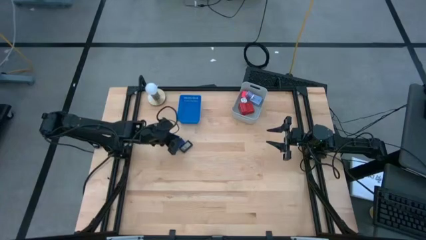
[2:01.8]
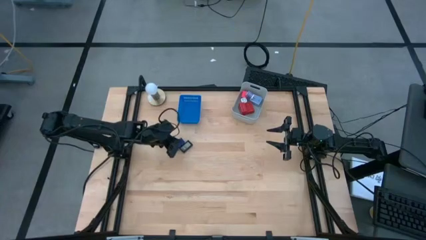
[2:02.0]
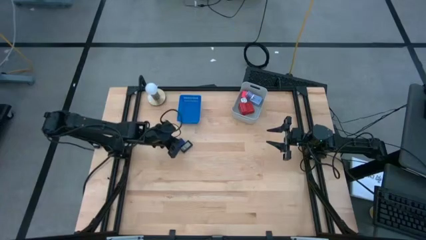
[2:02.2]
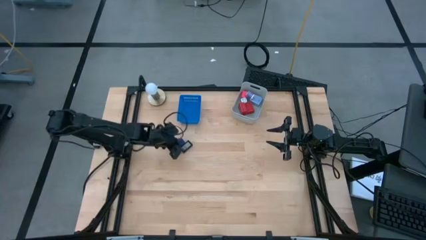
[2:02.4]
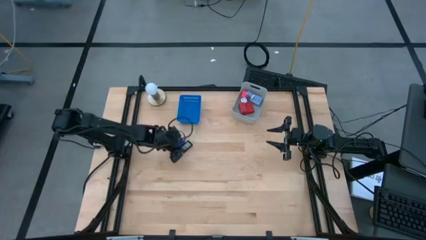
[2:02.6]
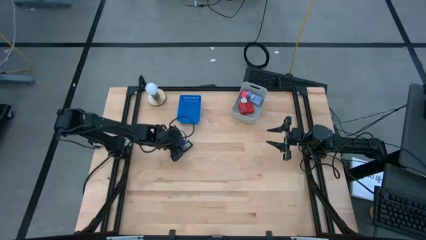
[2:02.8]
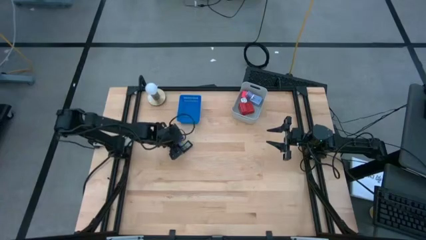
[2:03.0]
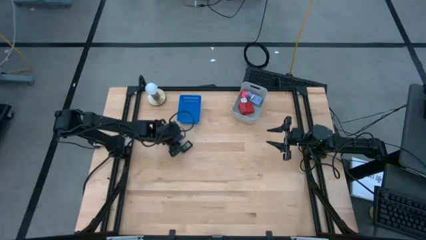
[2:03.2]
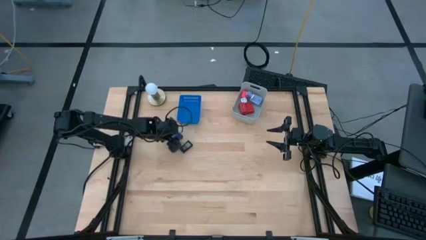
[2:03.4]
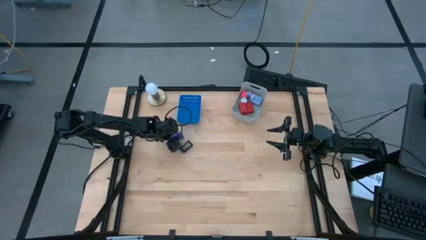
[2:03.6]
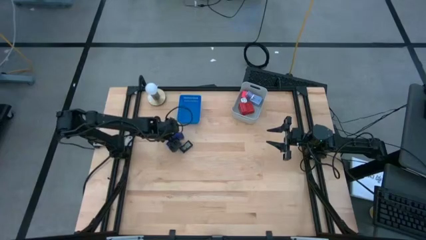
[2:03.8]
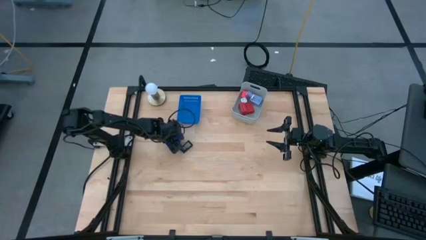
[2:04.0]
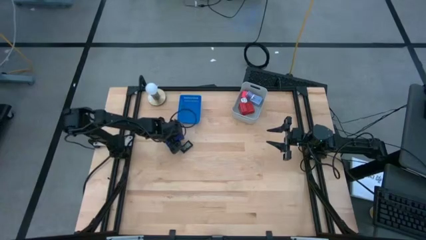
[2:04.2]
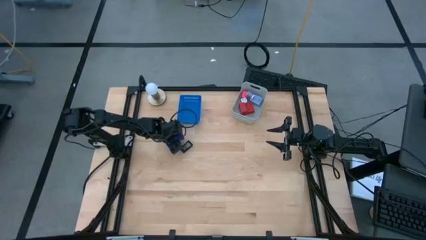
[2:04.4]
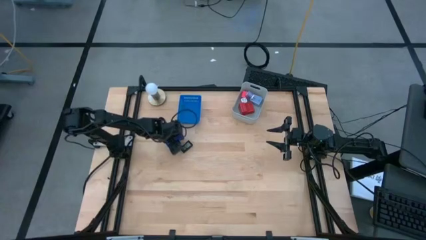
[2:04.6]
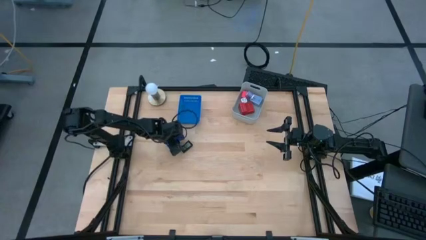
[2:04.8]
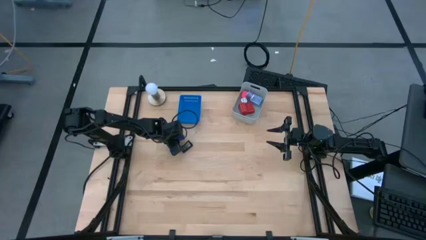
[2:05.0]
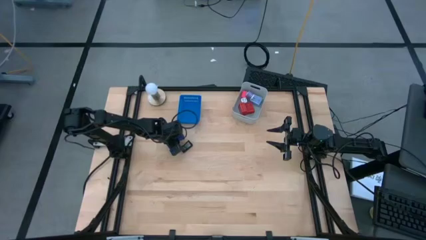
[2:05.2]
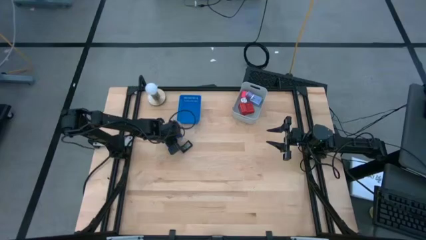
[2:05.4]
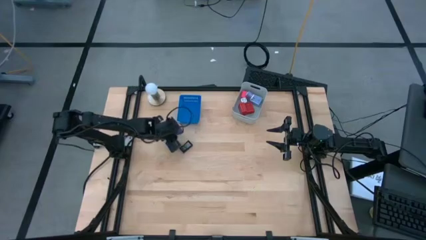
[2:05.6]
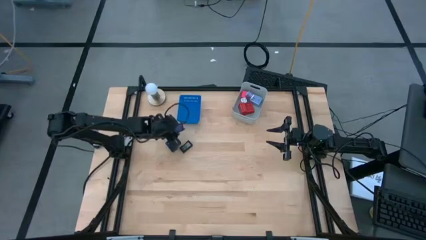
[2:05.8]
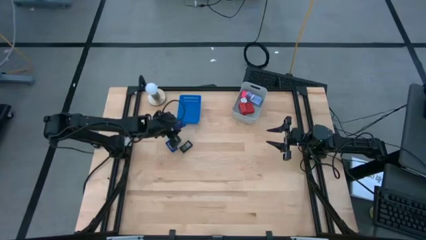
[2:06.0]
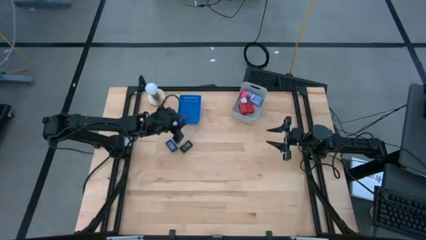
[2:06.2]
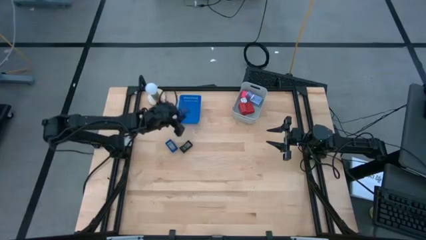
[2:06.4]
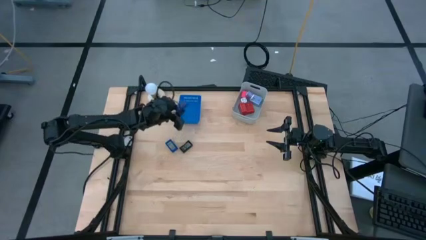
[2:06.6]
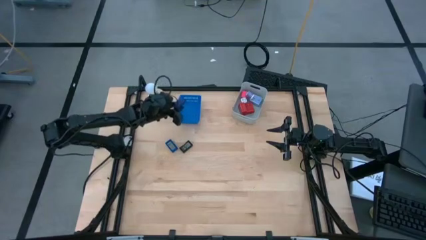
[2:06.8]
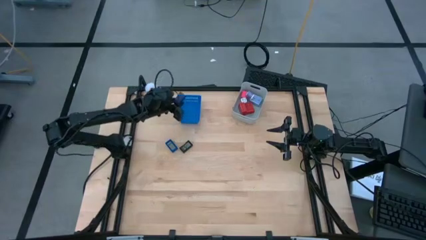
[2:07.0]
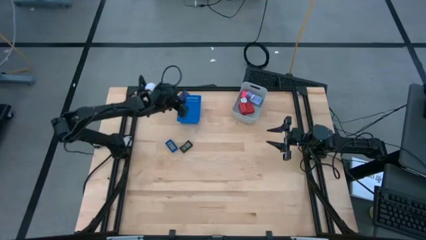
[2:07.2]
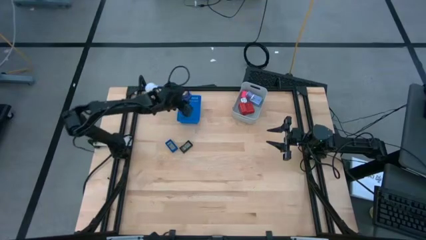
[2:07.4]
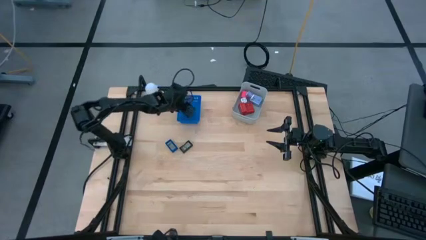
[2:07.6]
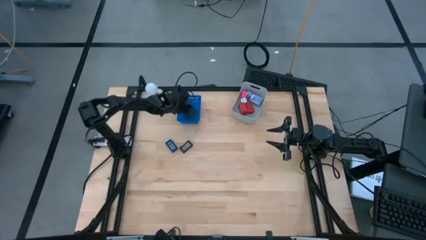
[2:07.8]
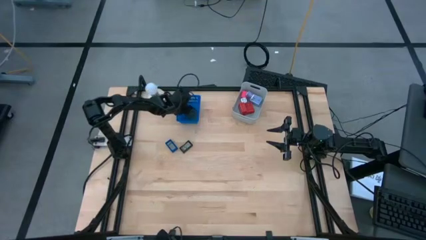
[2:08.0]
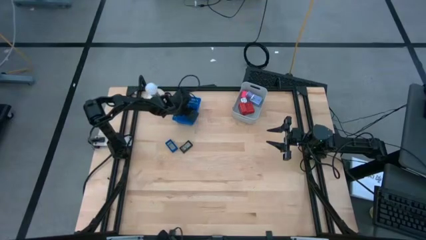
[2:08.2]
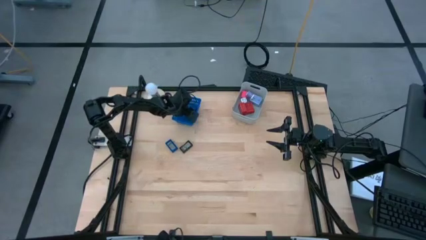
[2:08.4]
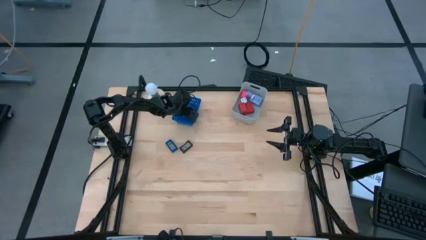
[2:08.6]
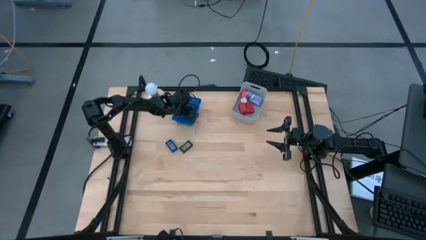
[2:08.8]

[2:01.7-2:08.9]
Task: Pick & Place Office items
Put the left blue digital clock into the blue bin

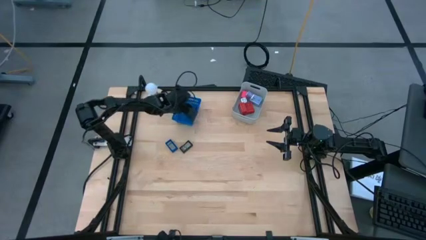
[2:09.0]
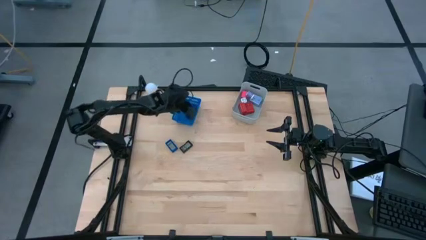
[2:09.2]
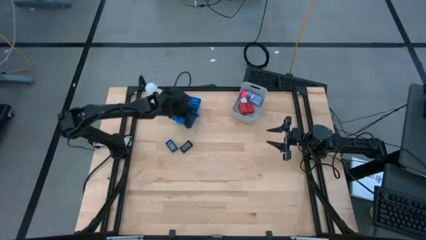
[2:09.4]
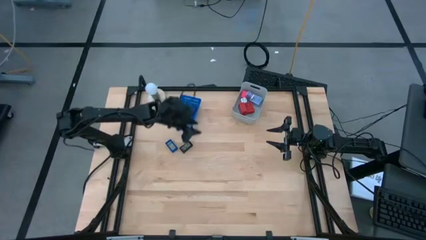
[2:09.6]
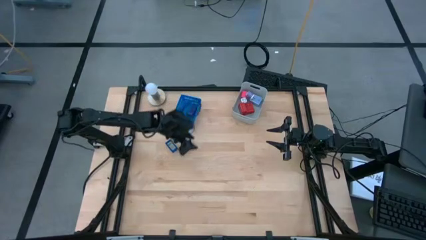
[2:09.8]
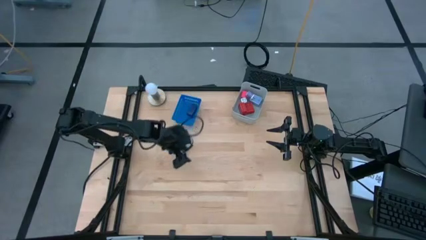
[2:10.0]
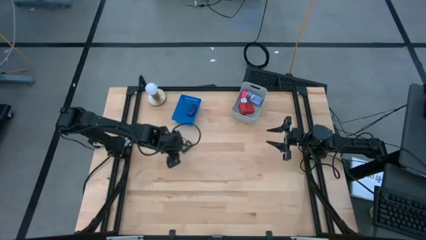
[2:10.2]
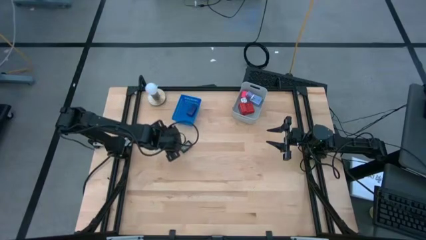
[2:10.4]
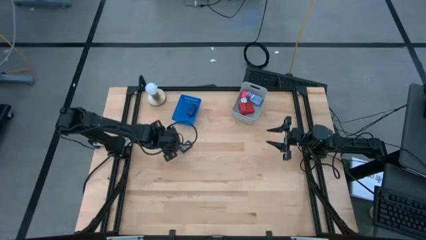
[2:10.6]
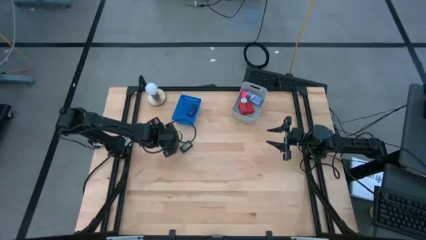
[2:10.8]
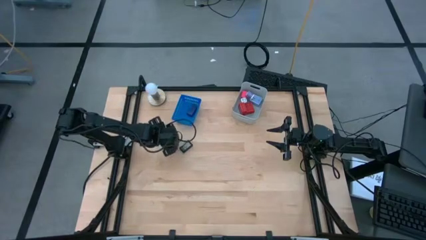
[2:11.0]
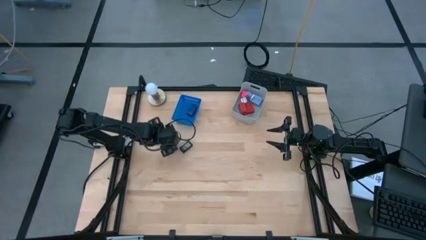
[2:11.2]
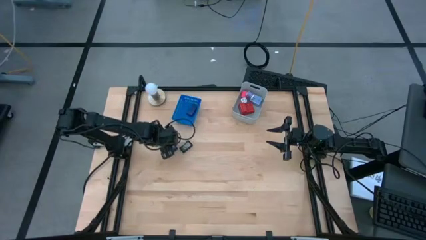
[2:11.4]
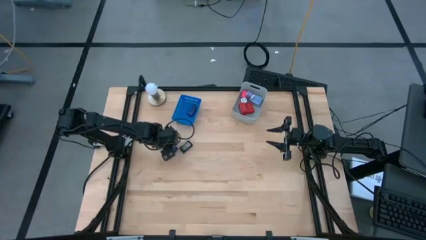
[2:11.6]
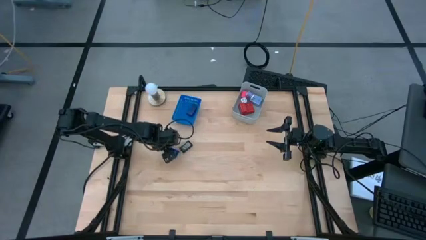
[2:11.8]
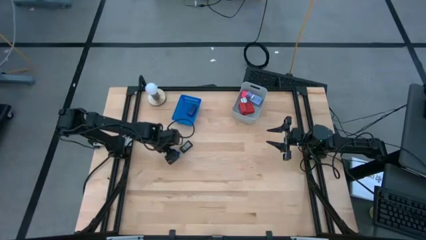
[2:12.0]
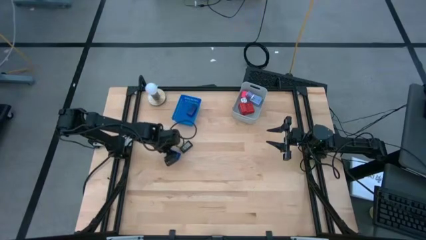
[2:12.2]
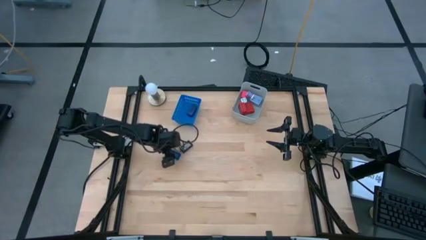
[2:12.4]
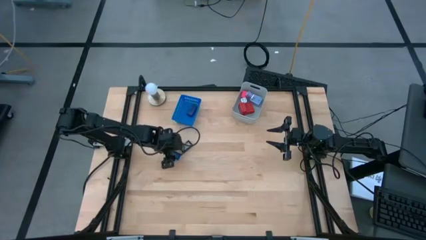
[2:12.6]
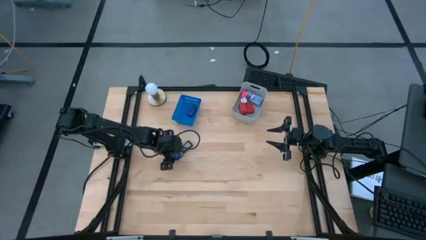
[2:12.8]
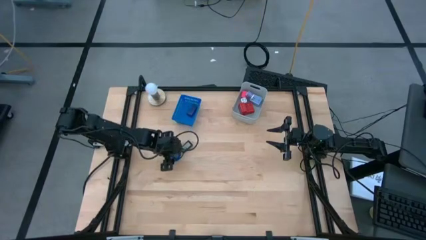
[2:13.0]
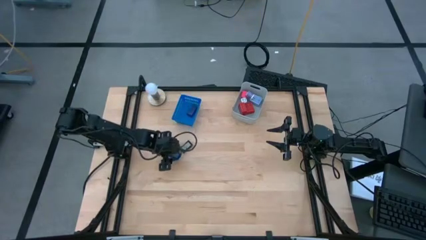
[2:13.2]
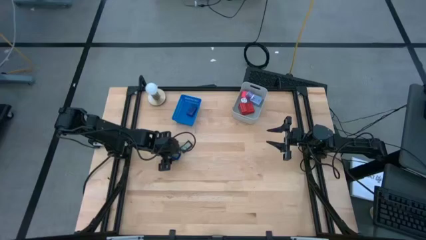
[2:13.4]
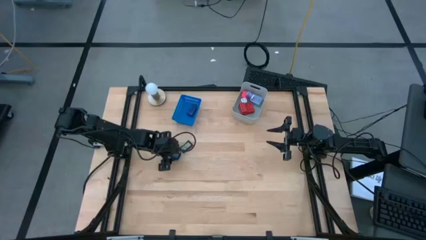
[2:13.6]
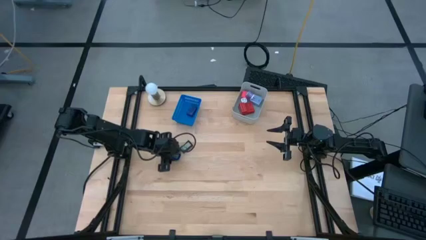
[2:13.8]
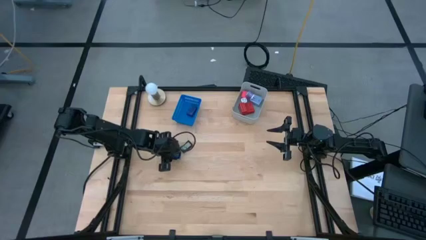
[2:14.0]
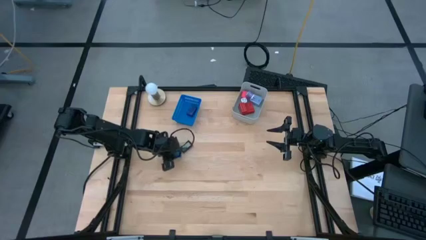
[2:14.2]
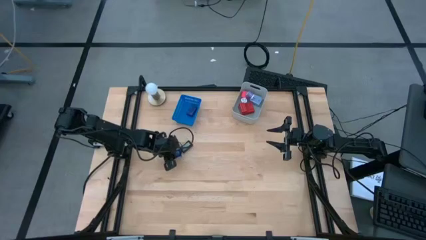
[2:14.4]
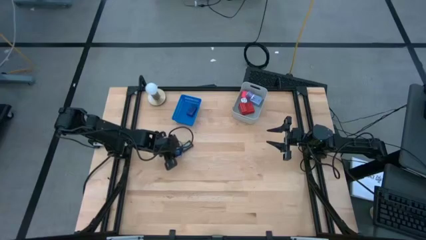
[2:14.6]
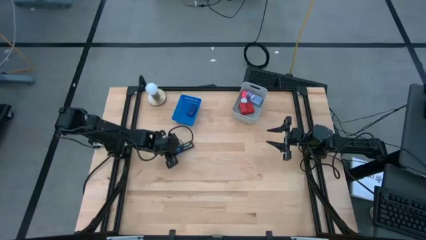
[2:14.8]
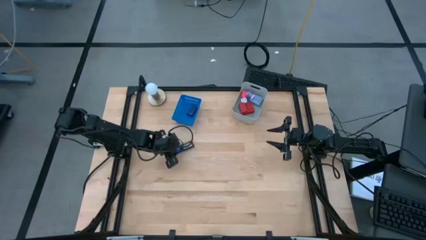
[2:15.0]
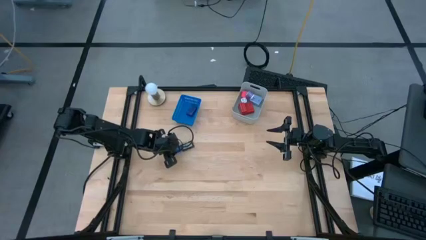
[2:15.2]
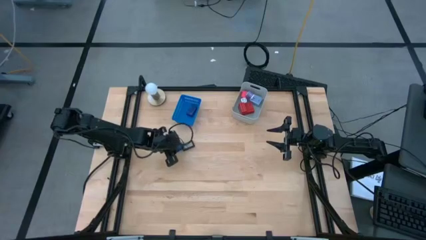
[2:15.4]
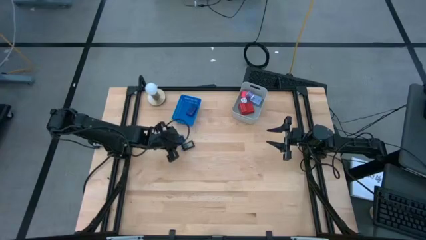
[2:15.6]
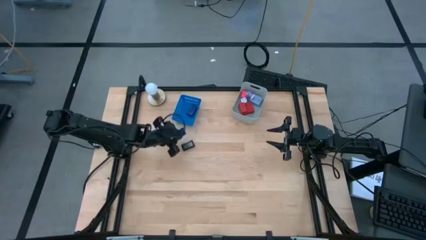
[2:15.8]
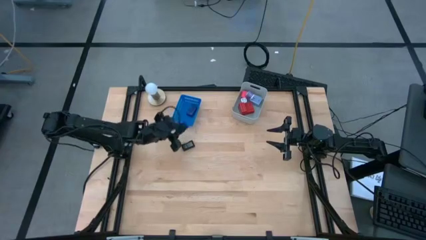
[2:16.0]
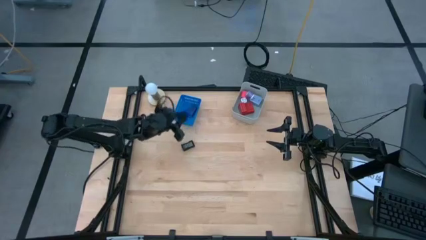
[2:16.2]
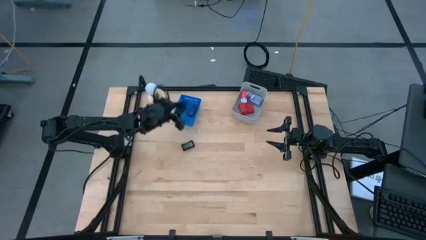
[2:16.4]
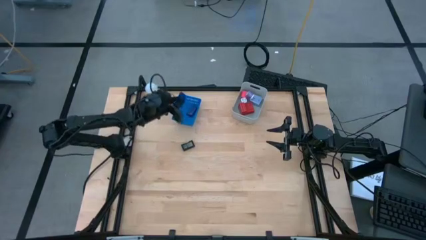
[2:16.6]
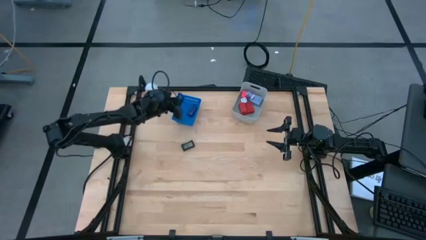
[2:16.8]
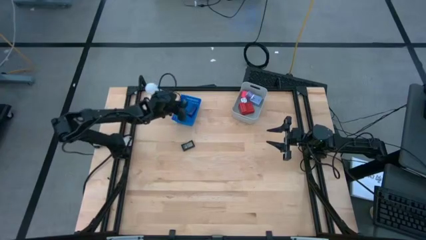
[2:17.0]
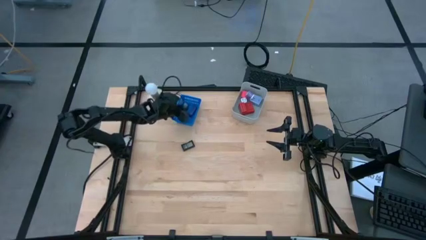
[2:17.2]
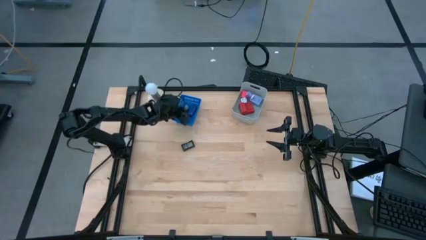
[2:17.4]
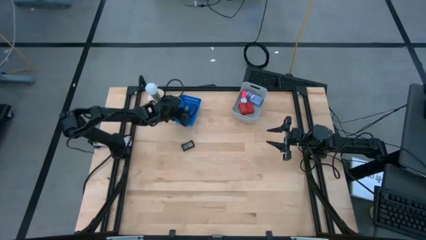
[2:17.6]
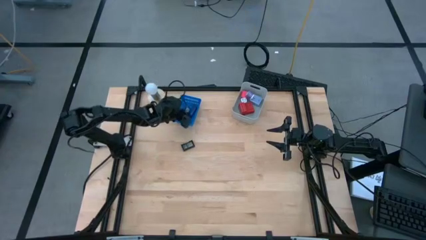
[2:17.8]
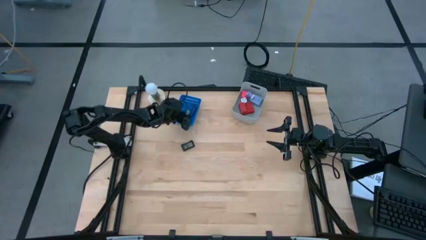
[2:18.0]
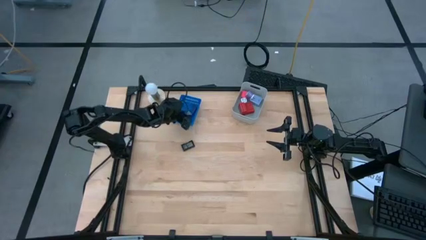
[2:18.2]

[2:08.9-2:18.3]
Put the blue digital clock into the blue bin
